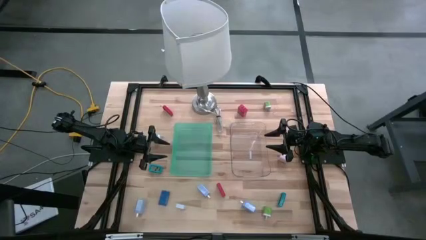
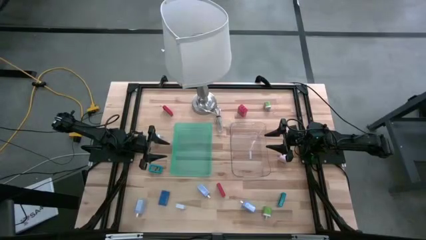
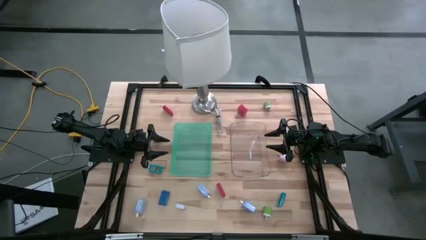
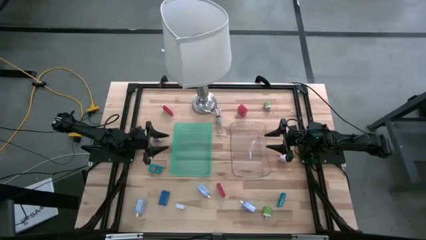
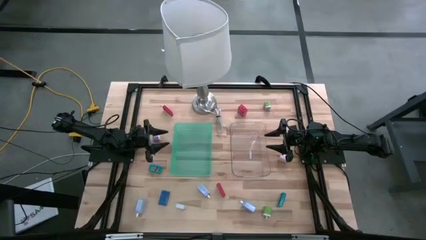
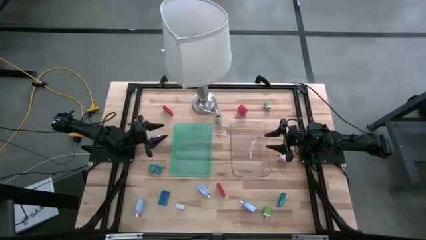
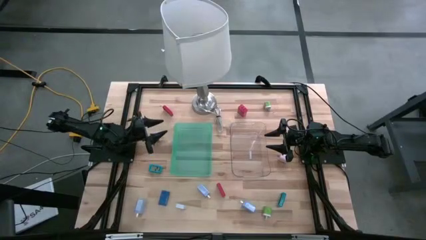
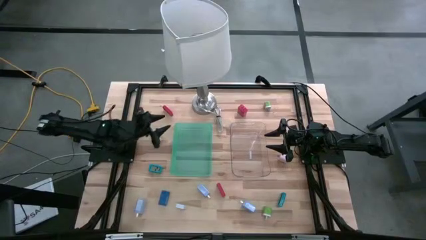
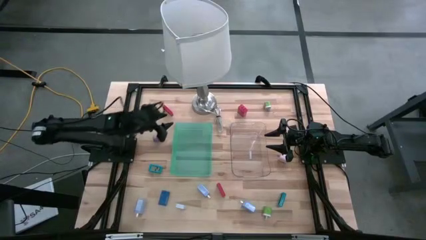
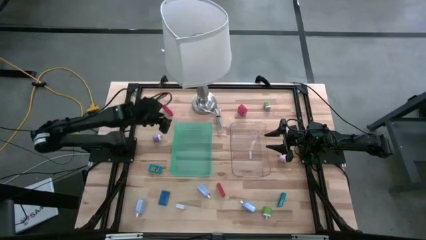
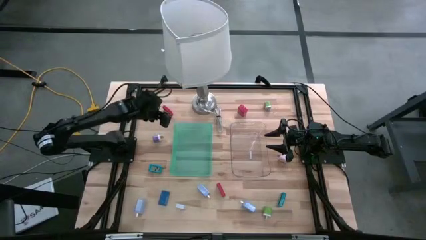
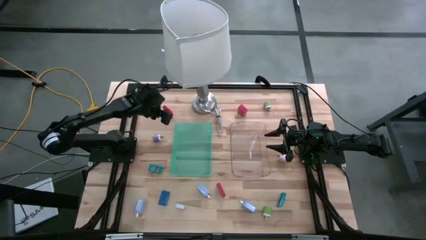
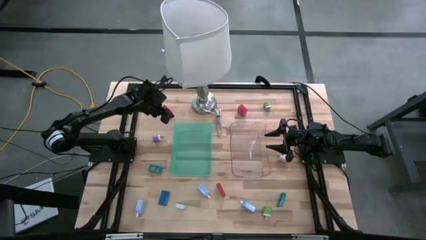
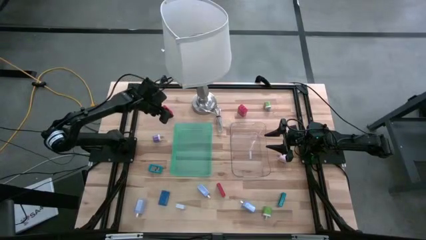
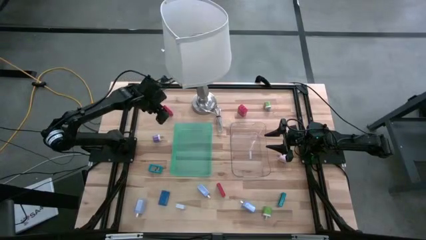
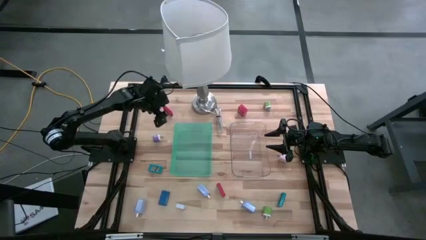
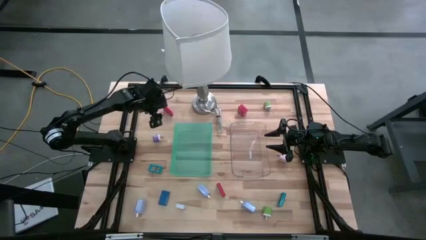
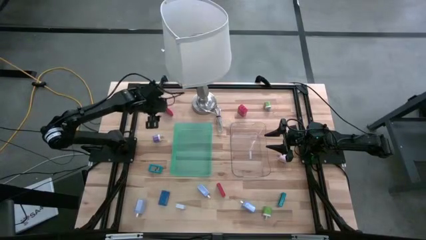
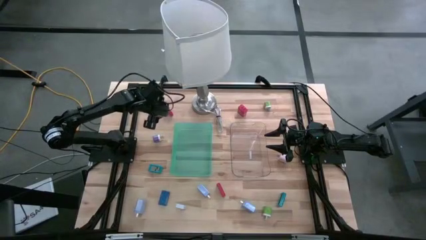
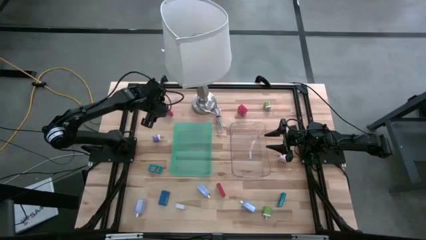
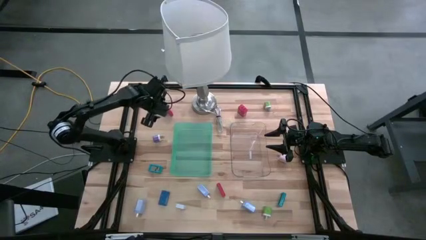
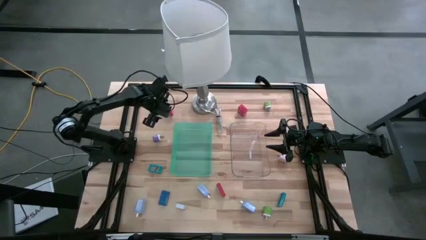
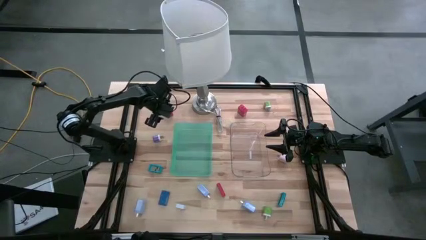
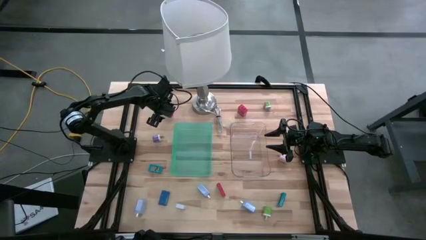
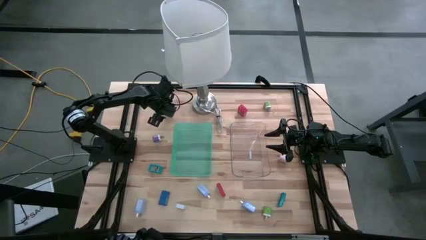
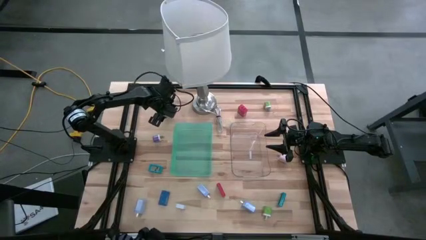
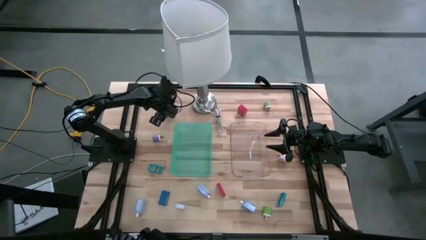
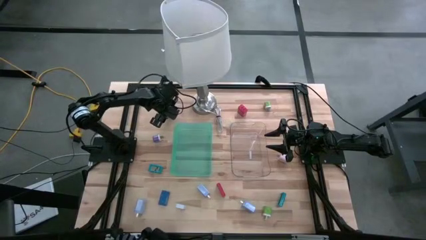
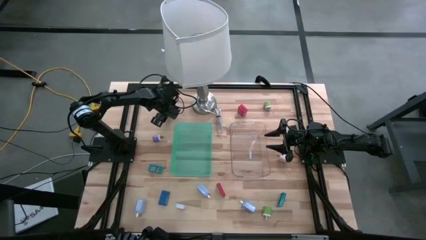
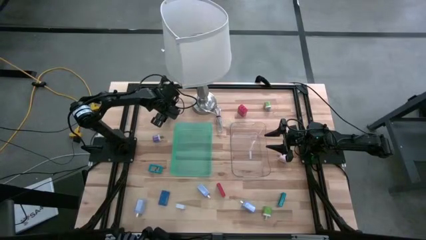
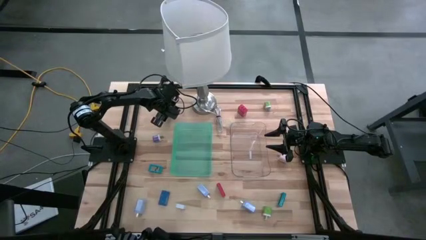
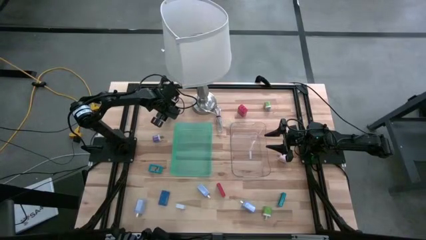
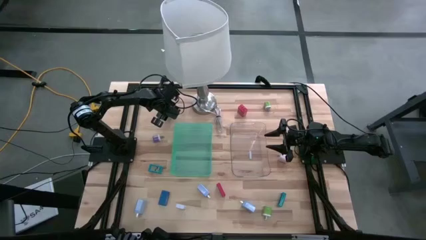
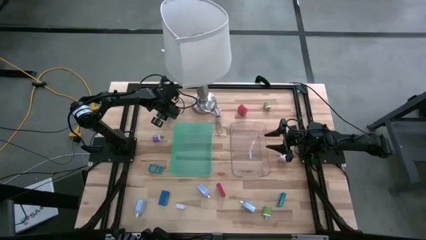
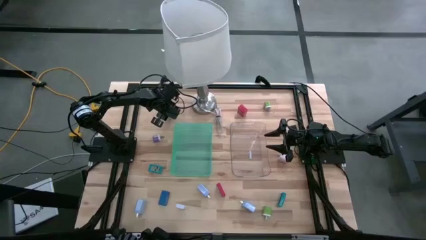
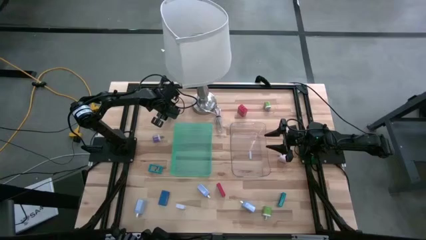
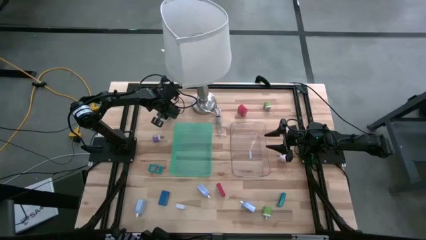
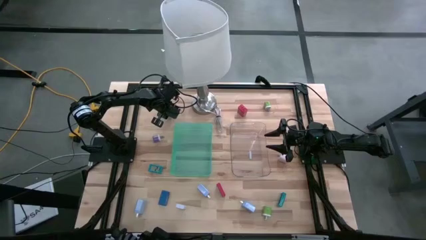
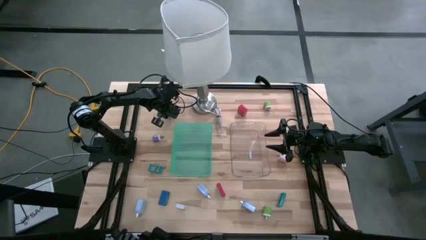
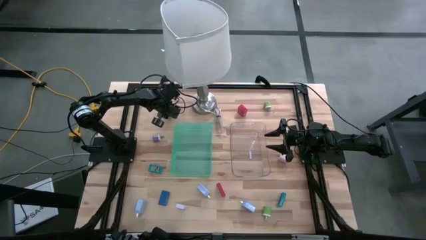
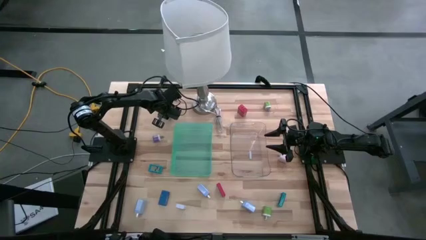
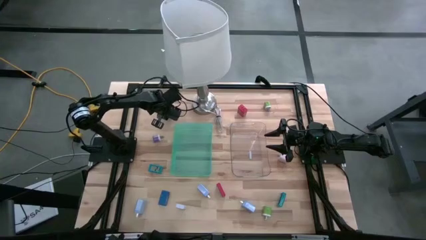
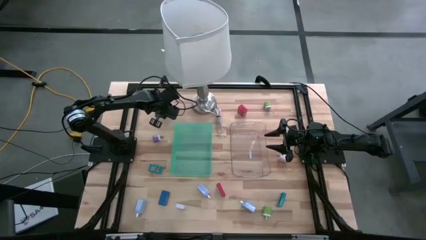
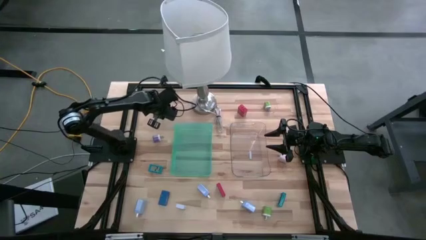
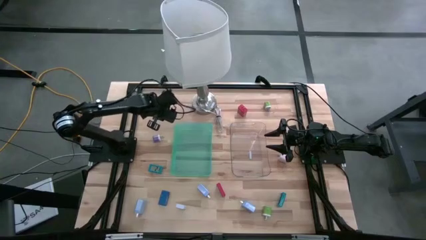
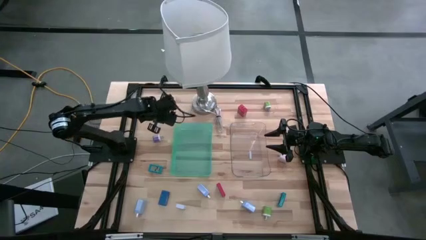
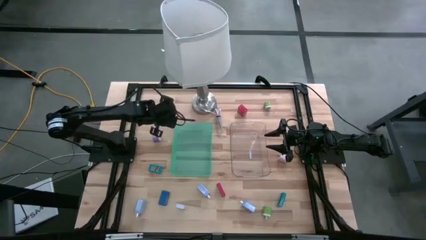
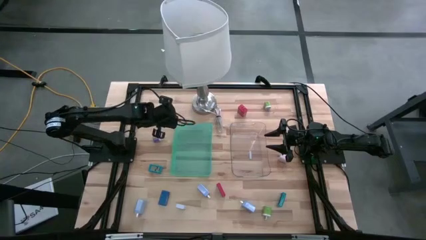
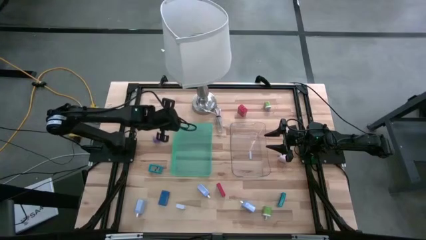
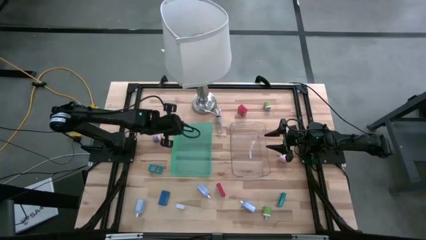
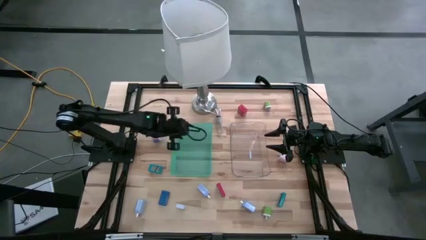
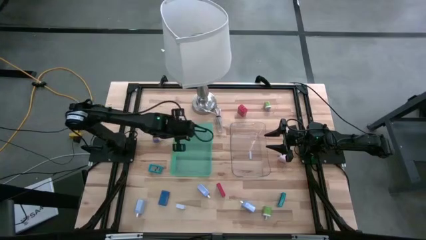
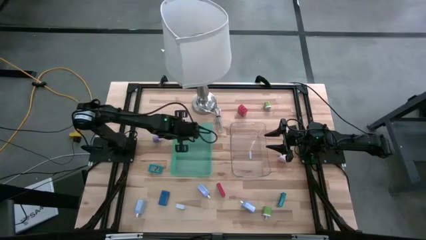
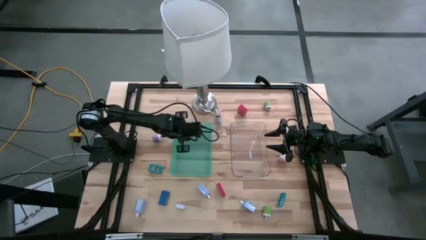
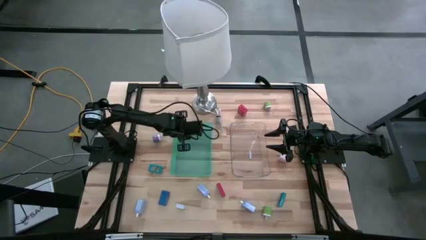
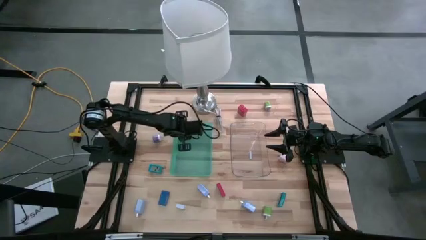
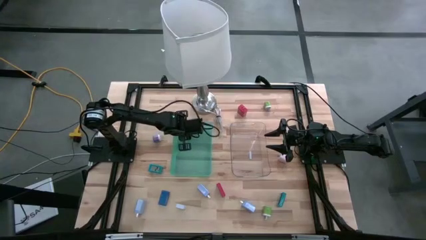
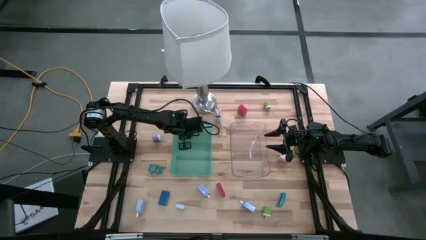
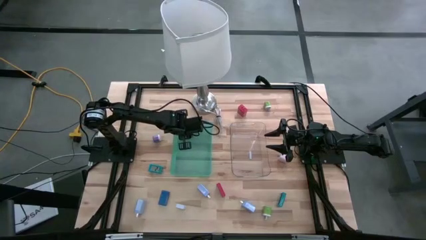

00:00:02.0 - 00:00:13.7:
Task: Pick & Place Office items
Put the top red digital clock into the green bin
